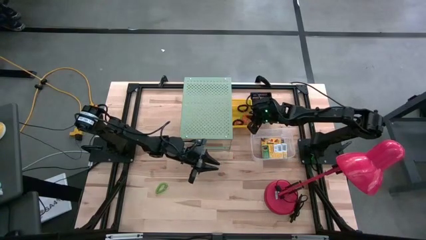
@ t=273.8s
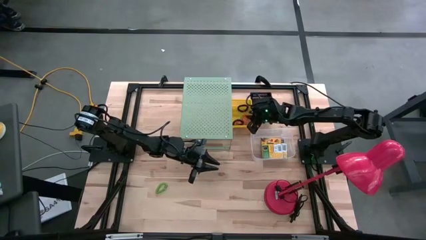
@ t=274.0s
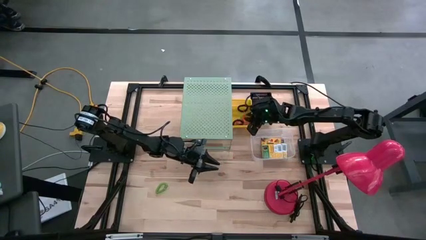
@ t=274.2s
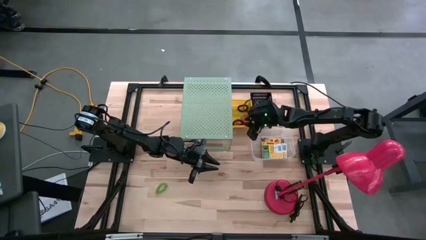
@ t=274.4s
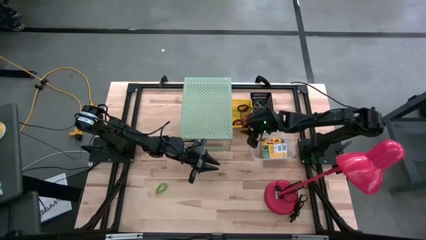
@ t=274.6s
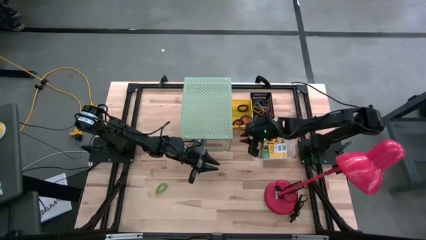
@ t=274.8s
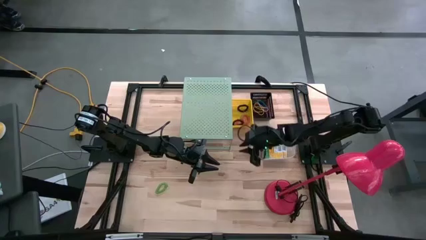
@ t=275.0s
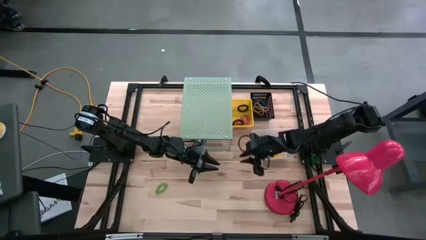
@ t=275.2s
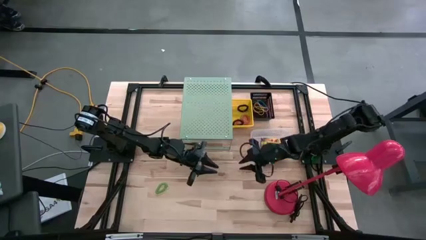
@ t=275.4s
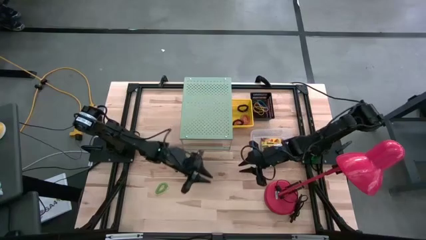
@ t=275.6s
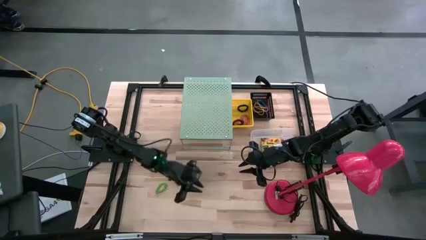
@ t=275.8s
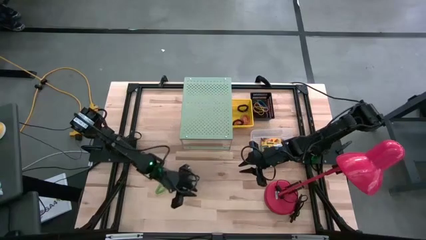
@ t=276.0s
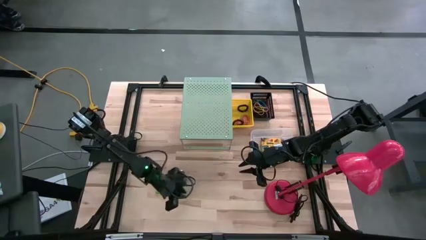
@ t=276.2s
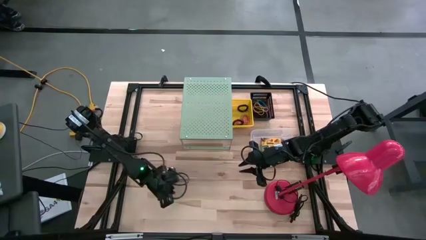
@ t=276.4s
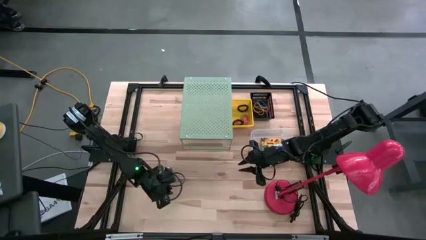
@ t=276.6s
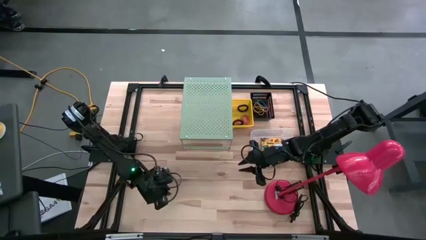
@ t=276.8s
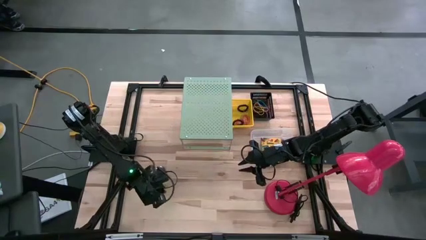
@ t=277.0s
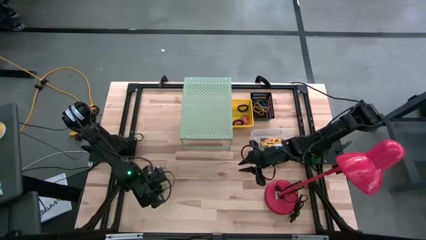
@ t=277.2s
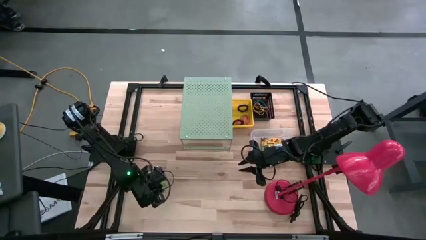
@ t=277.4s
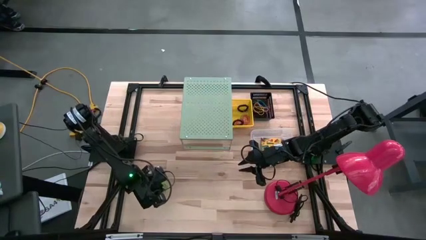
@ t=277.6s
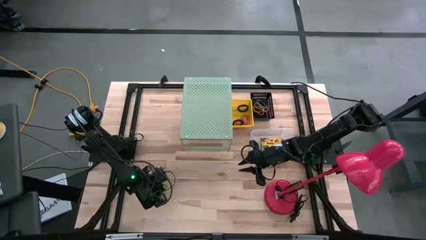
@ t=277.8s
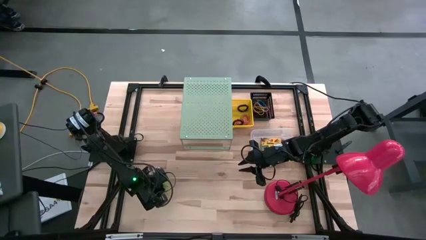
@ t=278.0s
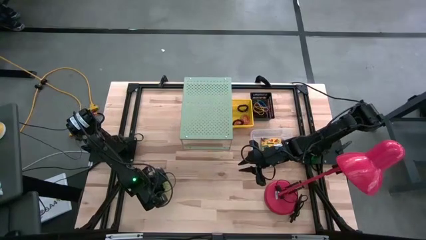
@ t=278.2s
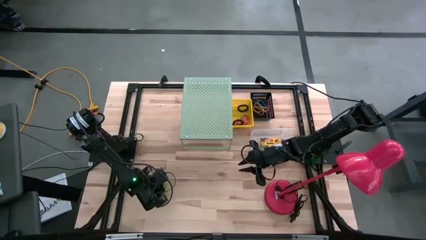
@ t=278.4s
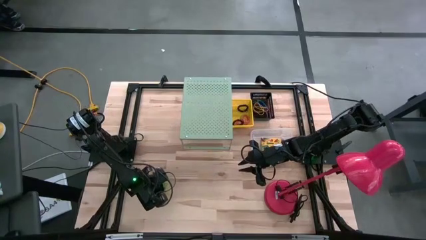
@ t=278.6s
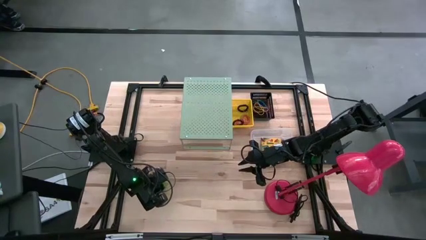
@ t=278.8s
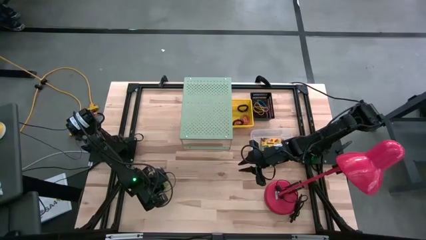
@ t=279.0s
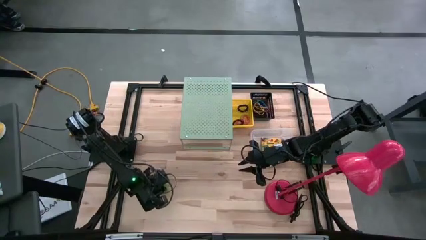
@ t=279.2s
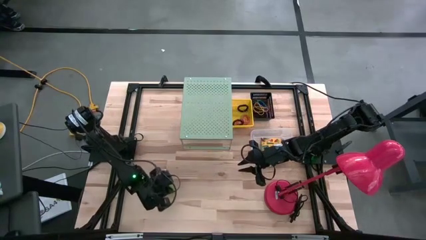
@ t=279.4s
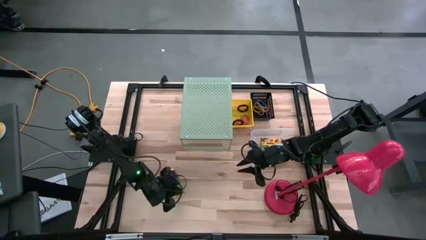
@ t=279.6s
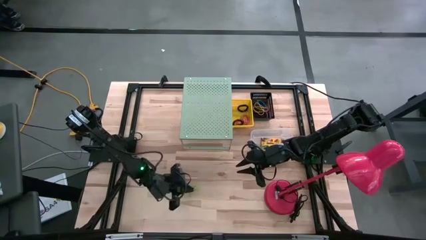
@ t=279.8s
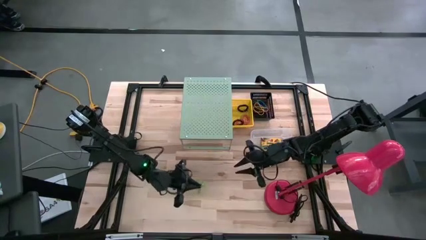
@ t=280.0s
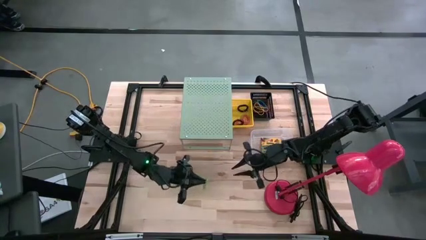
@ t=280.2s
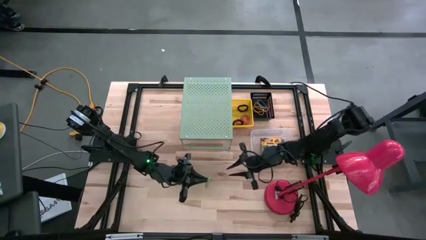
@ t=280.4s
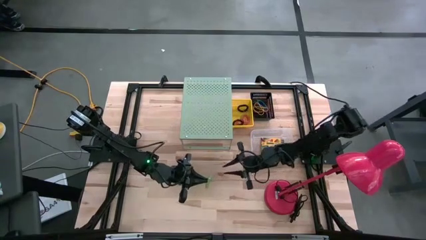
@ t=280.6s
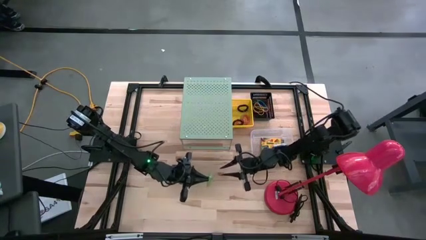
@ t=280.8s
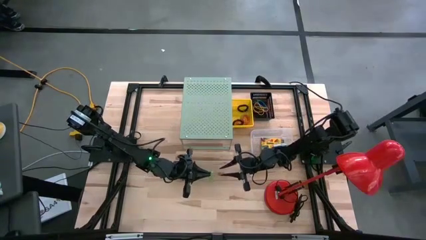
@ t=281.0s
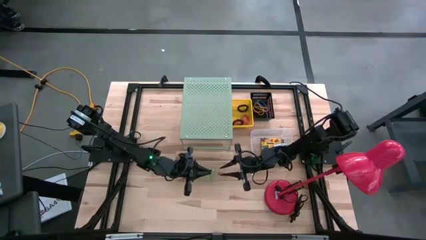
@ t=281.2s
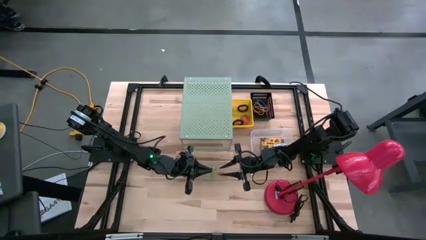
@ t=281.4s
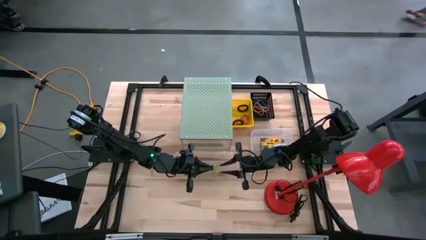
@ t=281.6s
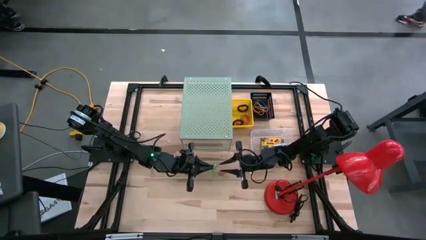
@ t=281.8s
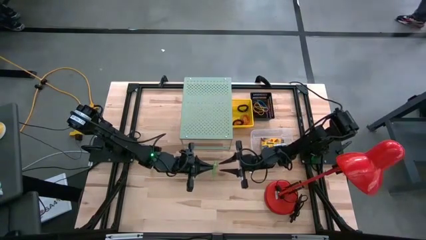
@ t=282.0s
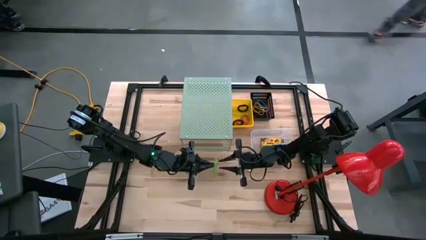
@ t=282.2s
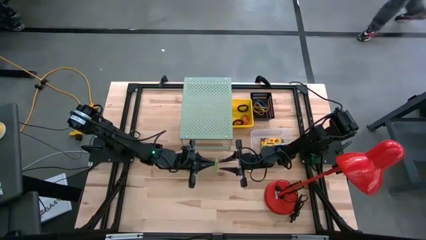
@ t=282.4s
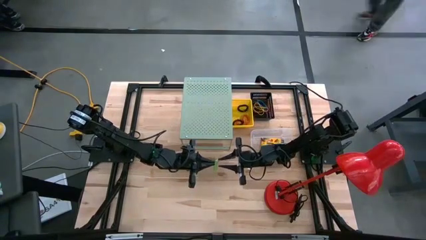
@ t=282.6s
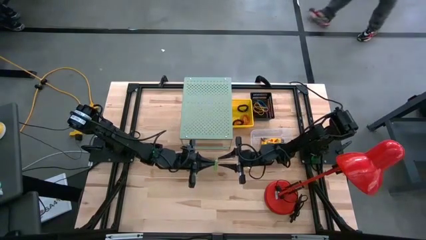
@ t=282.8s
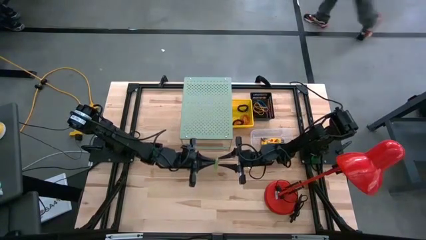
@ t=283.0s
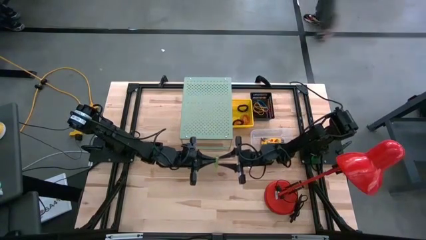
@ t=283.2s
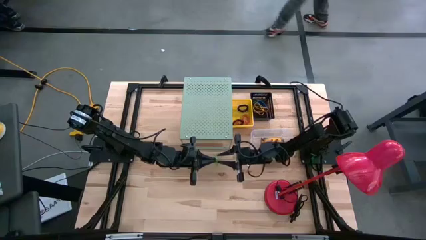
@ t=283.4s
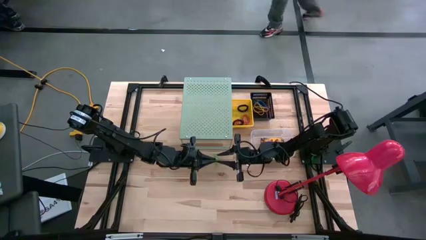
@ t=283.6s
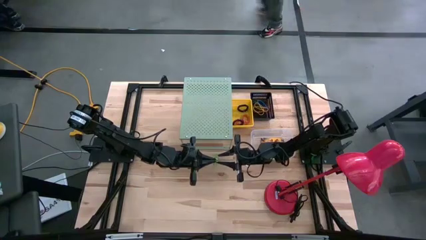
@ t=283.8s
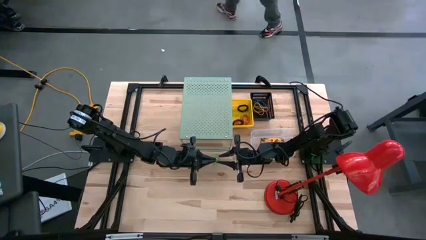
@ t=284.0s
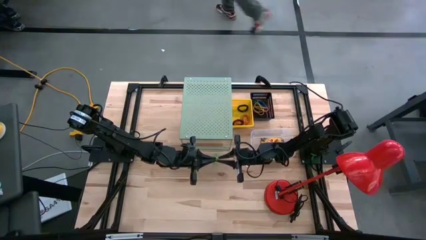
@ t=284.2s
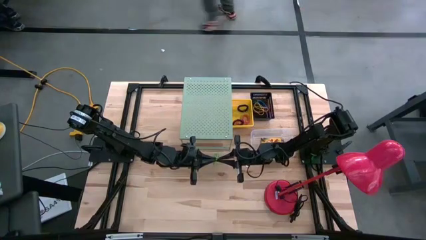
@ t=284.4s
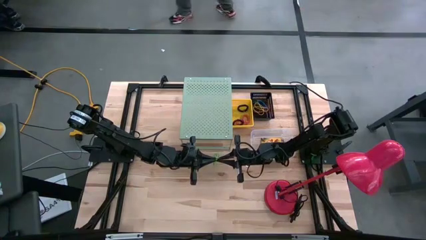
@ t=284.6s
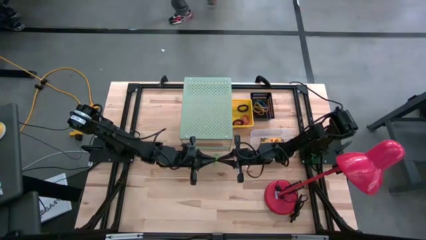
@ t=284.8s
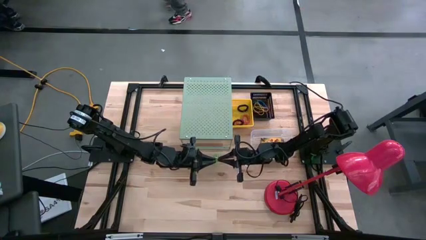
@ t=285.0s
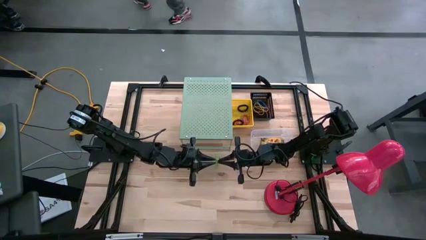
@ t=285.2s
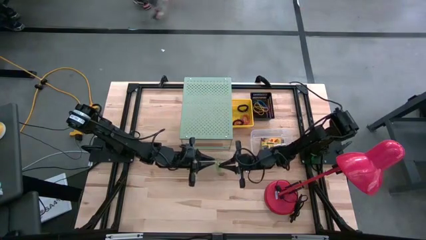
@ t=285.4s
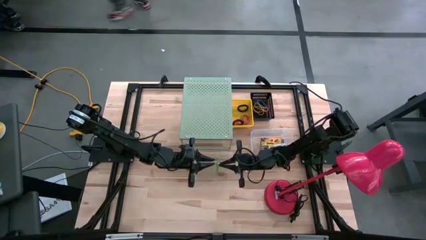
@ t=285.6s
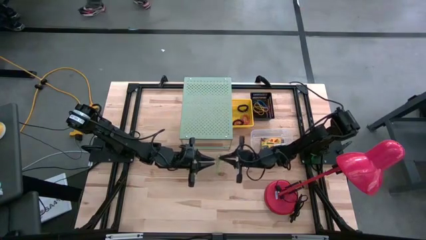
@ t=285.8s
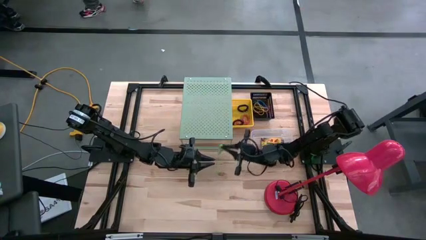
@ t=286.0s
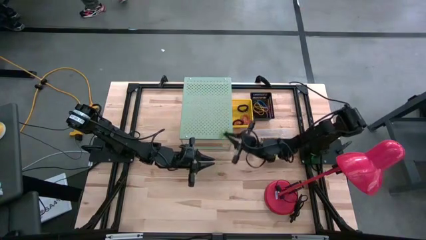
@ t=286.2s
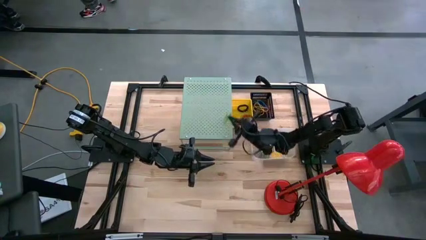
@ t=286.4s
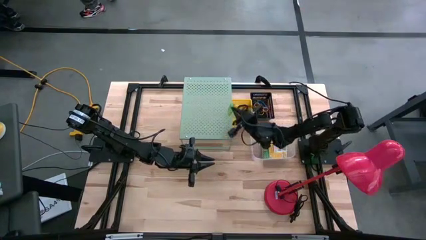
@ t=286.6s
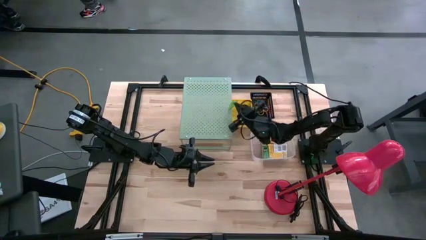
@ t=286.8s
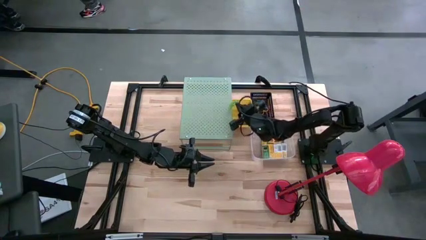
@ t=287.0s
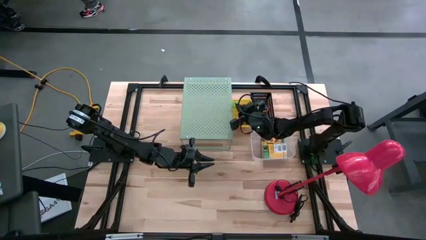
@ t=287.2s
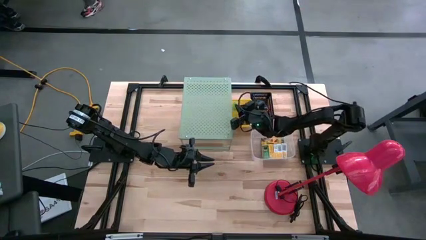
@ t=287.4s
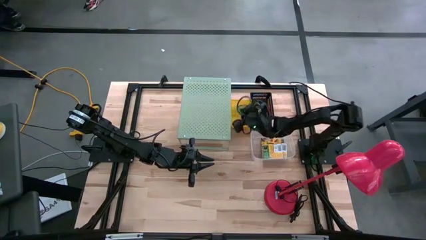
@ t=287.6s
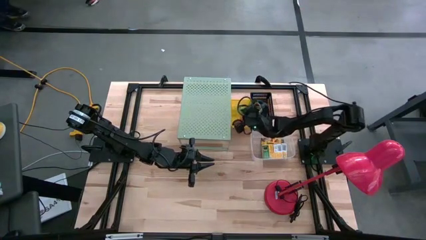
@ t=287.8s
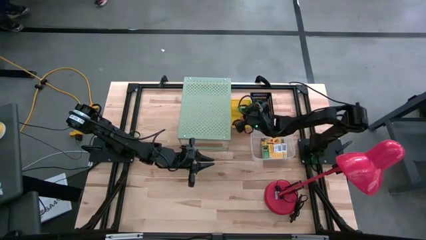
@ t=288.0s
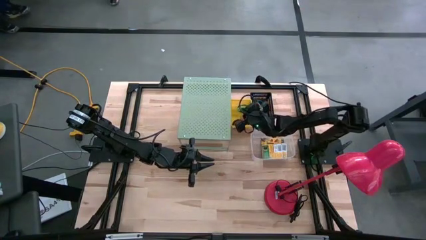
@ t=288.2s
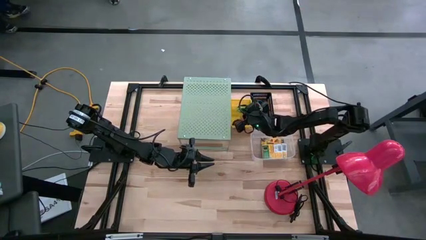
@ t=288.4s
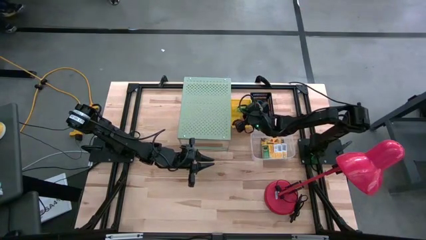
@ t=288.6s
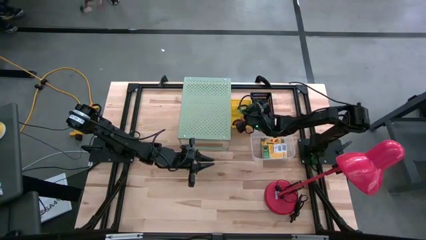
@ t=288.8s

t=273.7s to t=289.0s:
Task: Pick & Place Office Desk Supplies
Put the green spring keychain into the yellow bin
